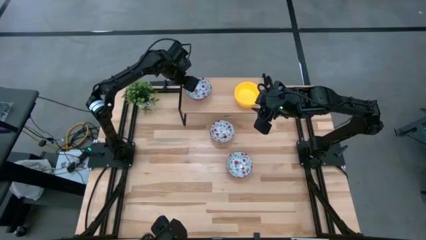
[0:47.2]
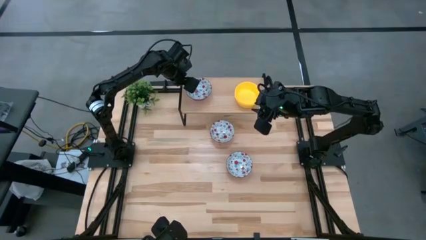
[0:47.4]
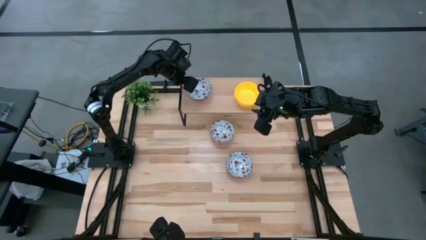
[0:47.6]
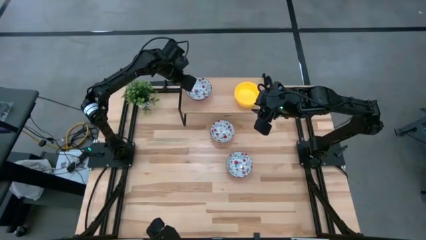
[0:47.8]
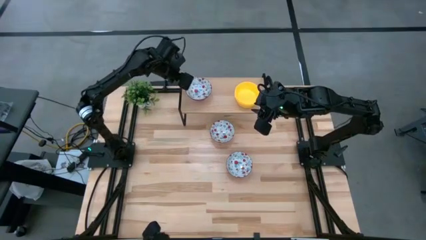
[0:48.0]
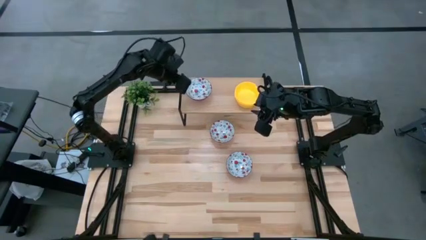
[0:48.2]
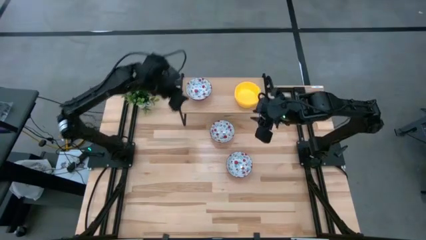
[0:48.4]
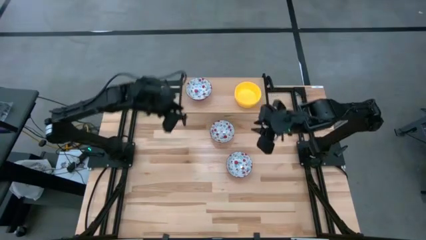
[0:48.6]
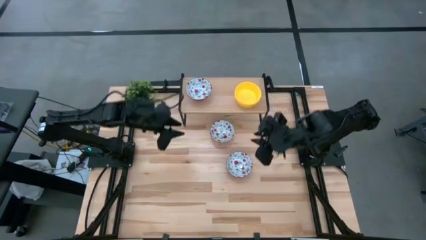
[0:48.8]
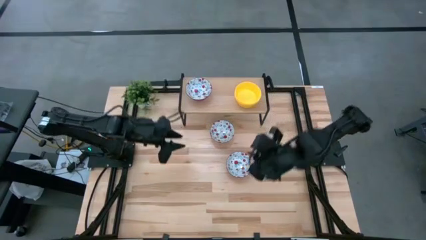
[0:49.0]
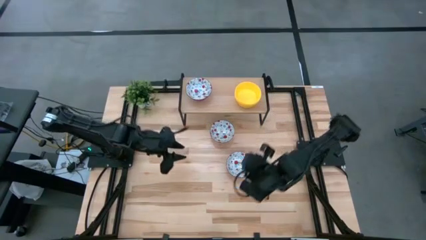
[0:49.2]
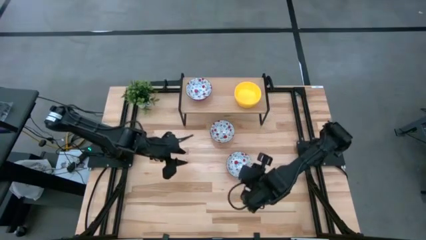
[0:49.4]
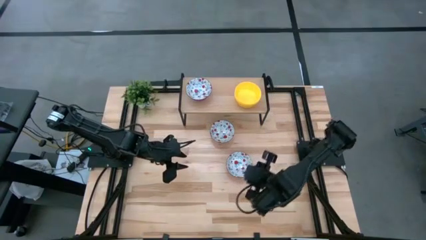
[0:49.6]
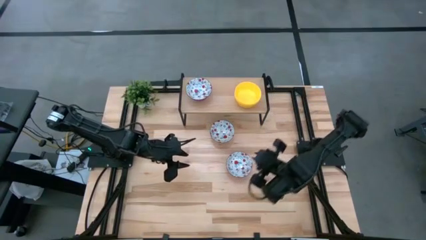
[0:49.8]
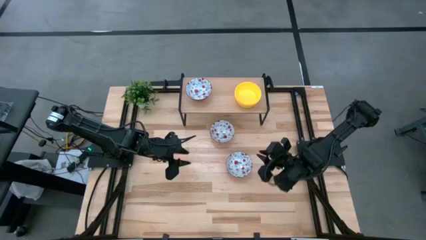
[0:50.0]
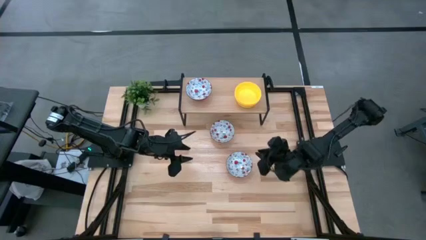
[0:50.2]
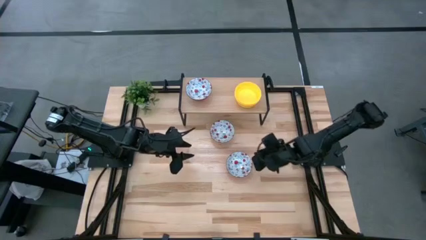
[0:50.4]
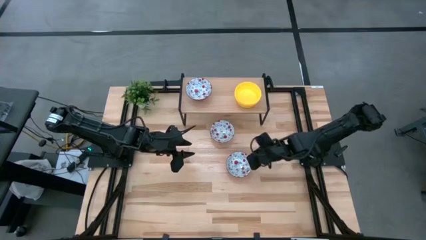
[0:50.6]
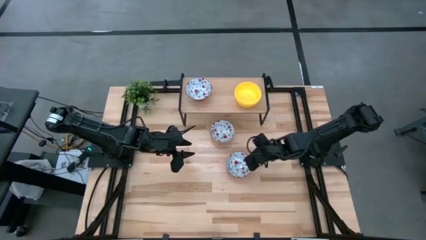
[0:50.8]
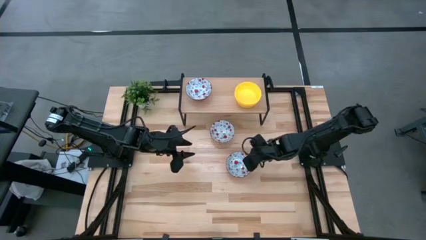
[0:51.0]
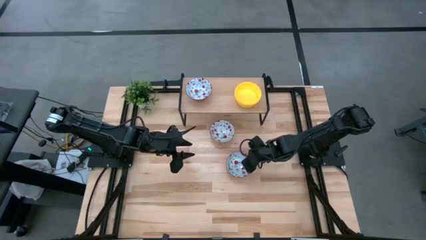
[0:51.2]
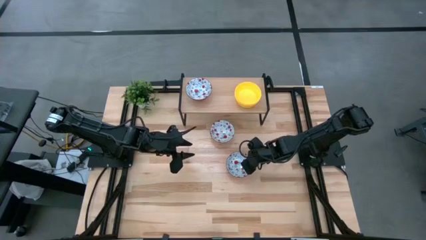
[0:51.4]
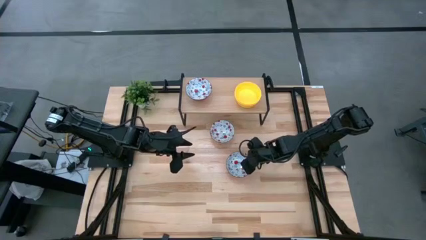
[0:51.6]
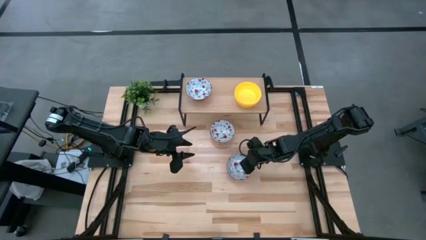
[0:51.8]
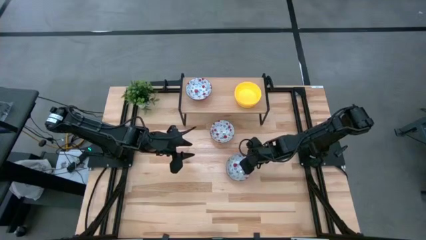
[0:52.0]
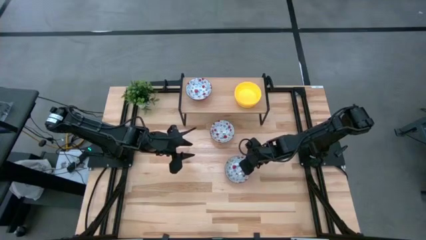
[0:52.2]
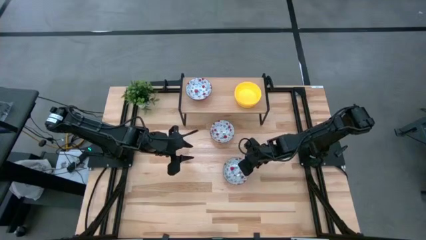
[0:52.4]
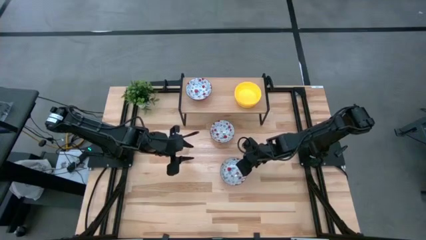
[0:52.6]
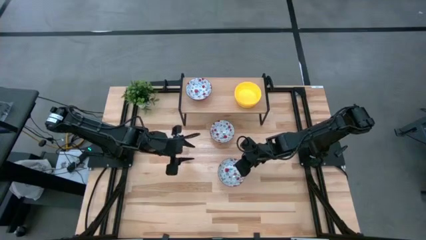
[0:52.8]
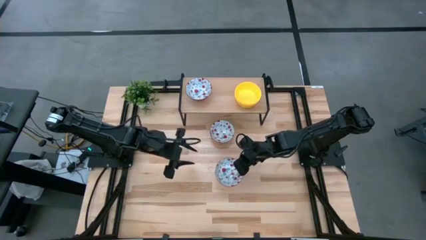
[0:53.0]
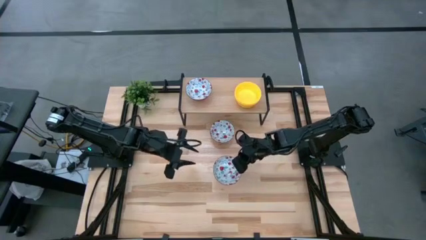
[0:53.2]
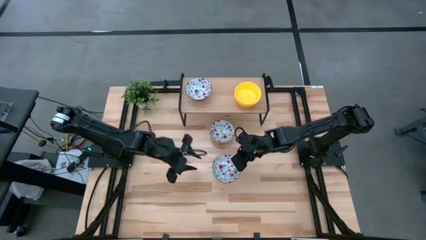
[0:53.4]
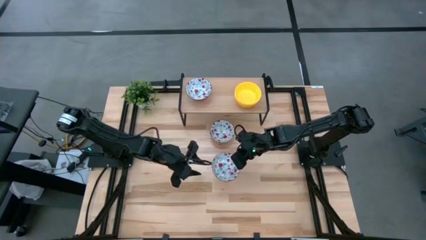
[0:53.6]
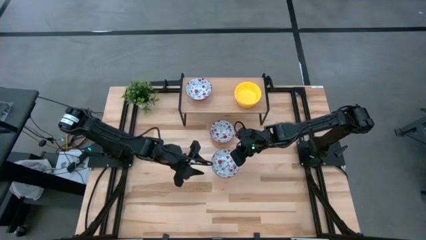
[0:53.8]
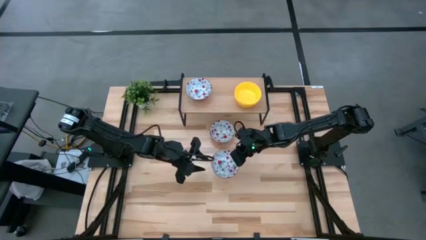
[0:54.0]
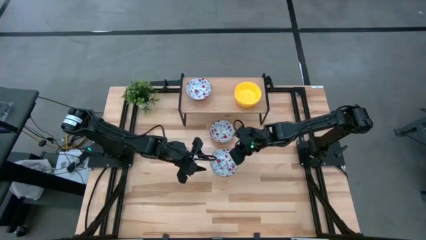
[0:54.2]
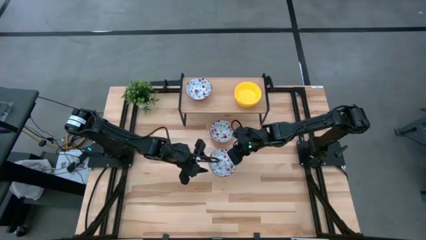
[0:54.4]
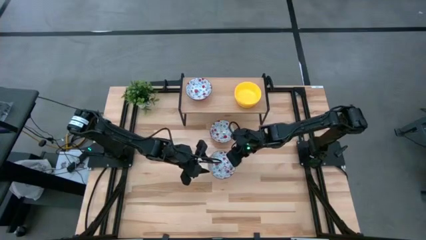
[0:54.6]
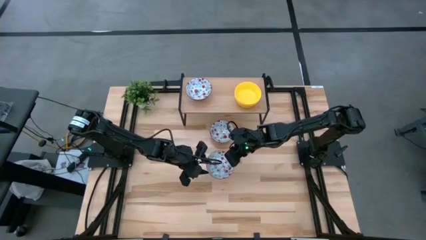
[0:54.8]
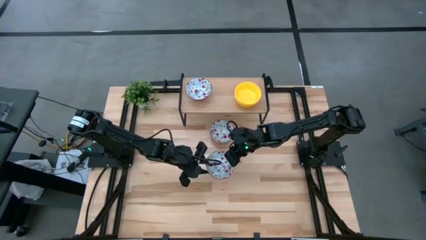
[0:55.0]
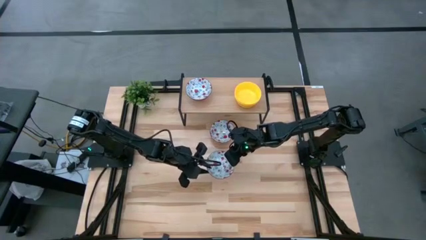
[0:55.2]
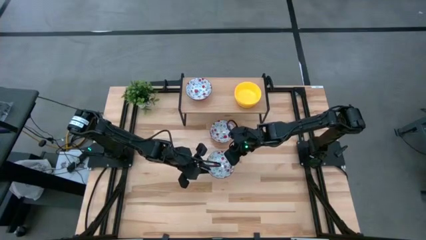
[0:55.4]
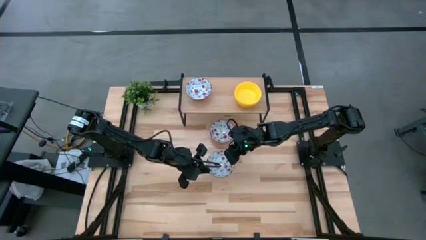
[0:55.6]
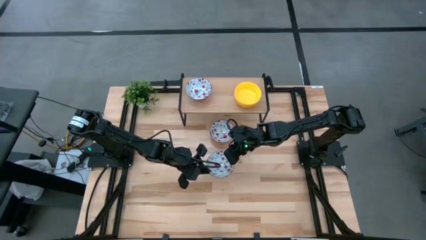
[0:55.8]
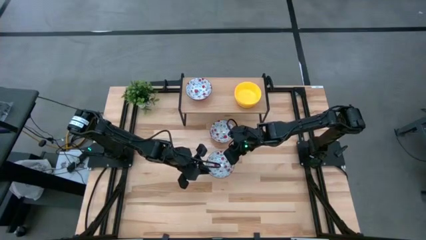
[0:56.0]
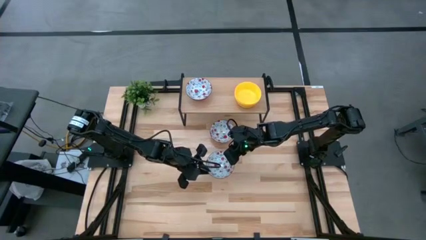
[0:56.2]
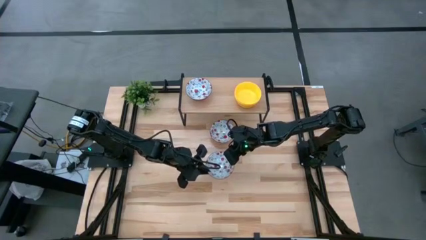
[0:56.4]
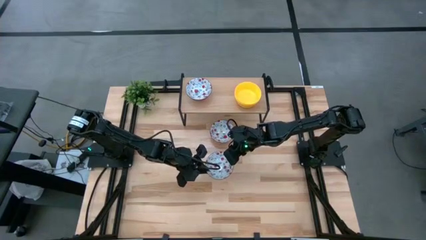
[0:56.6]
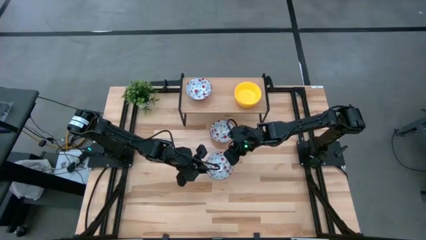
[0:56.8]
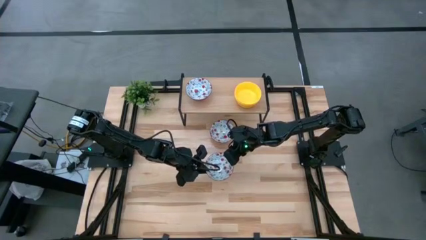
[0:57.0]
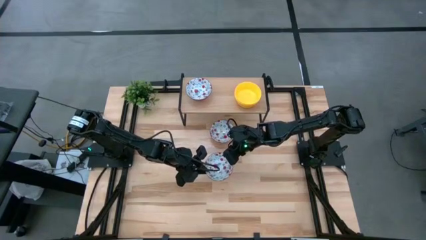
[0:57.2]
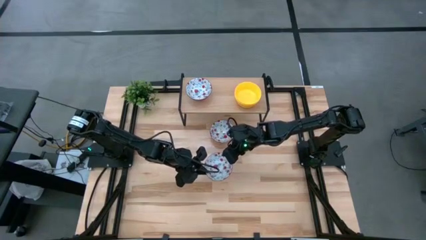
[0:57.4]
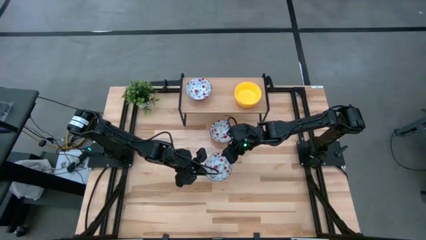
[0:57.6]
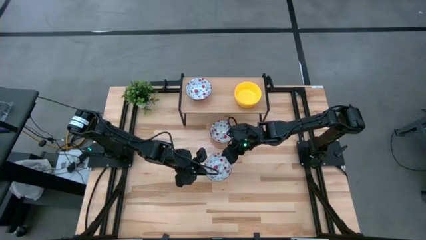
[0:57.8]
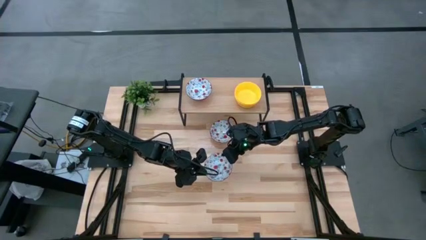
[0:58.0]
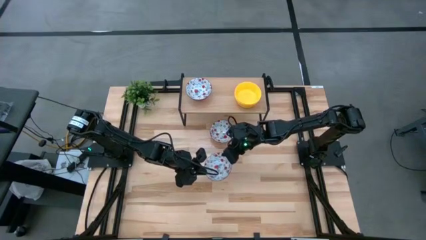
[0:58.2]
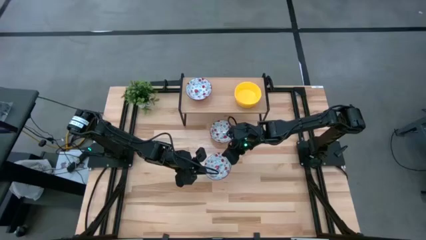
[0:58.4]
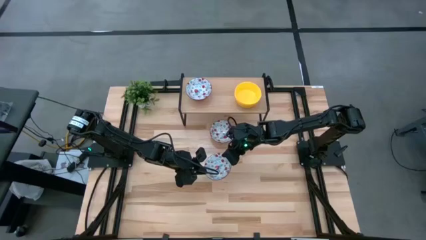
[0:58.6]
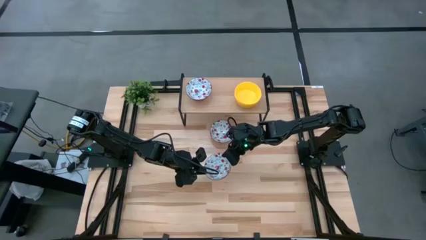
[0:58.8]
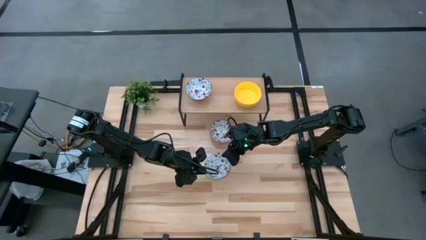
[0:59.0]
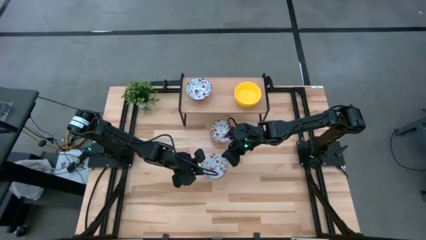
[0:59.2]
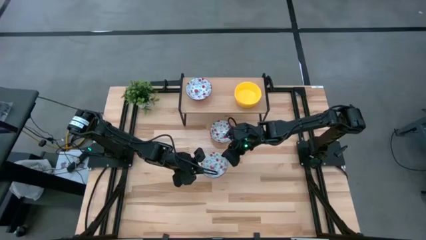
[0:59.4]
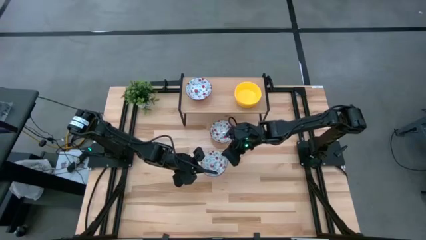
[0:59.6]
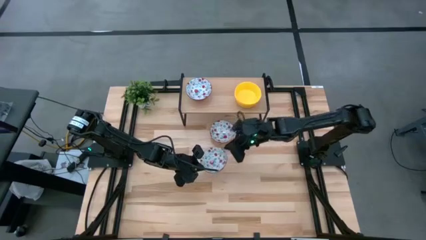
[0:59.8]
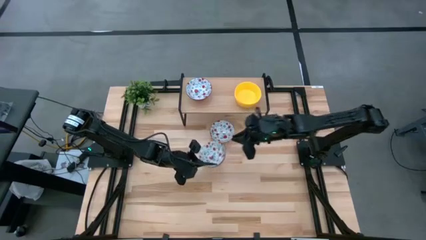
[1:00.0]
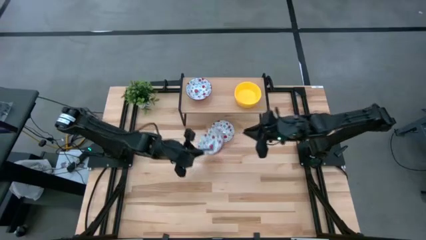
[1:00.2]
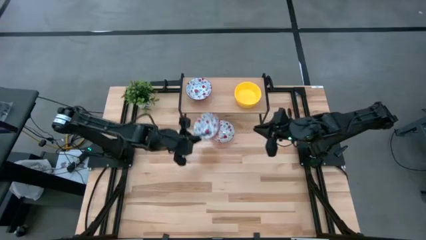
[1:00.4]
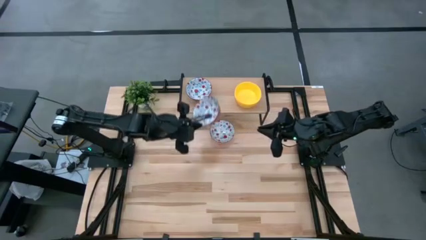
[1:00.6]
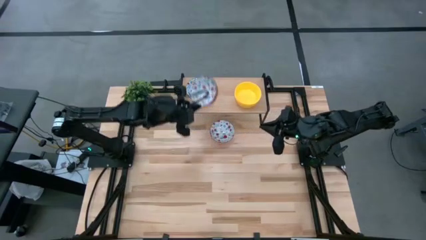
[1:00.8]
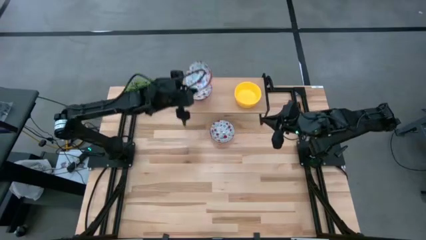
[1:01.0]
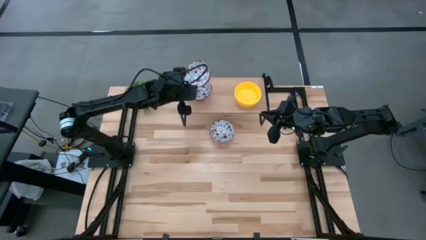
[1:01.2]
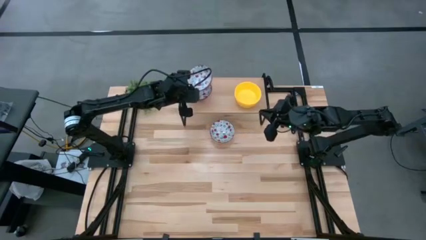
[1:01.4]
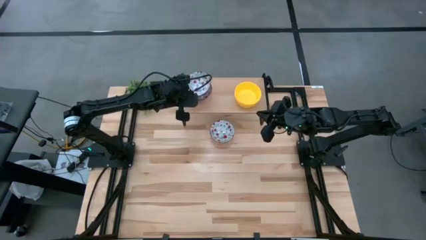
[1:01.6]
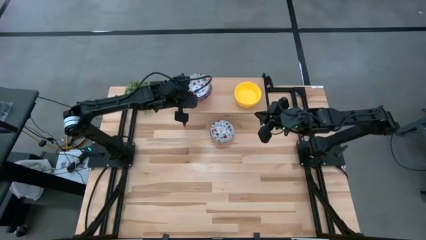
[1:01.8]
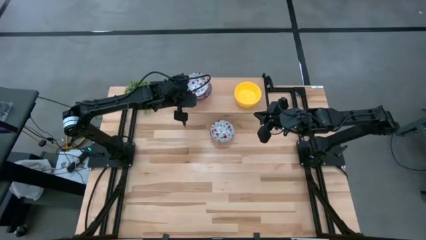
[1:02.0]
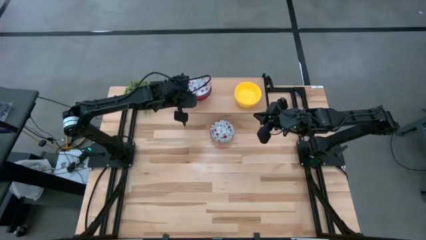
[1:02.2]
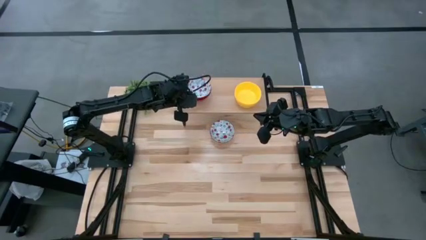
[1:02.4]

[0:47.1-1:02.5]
Task: Pick & Place Mini bowls
Stack the bottom printed bowl on the printed bowl on the shelf
